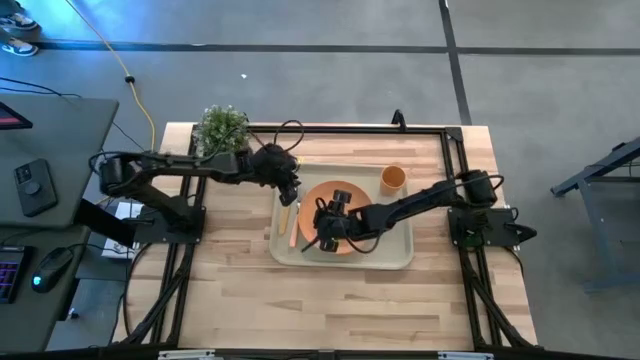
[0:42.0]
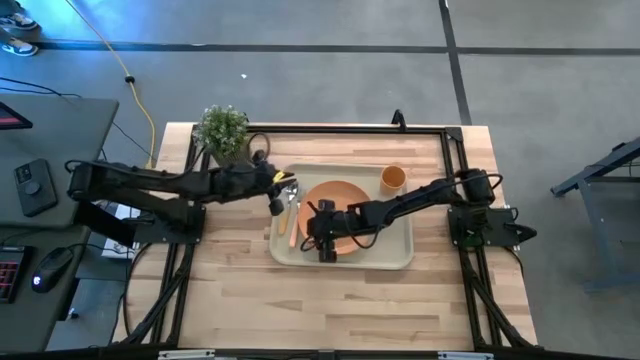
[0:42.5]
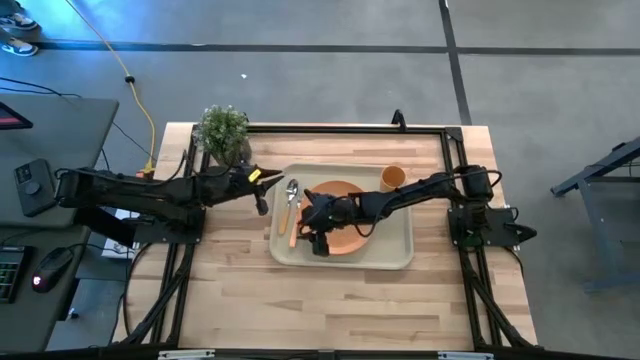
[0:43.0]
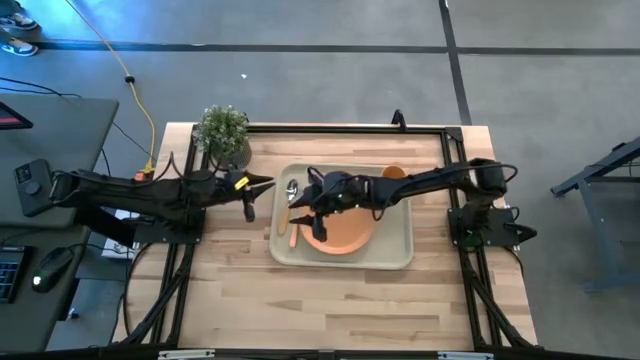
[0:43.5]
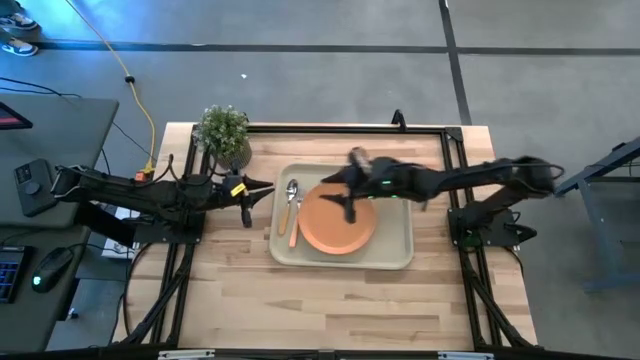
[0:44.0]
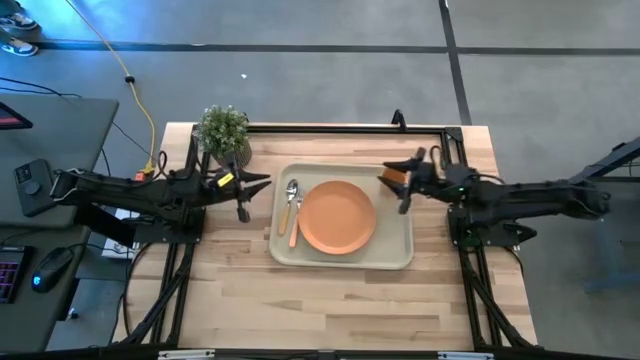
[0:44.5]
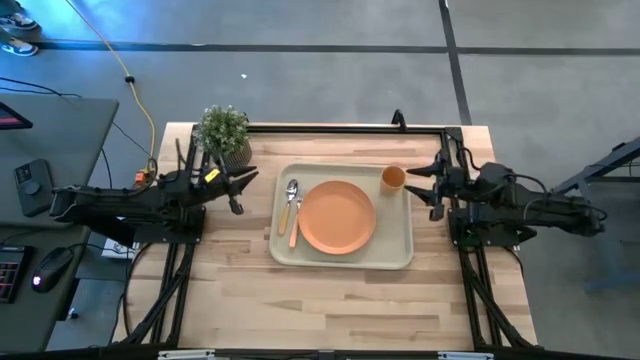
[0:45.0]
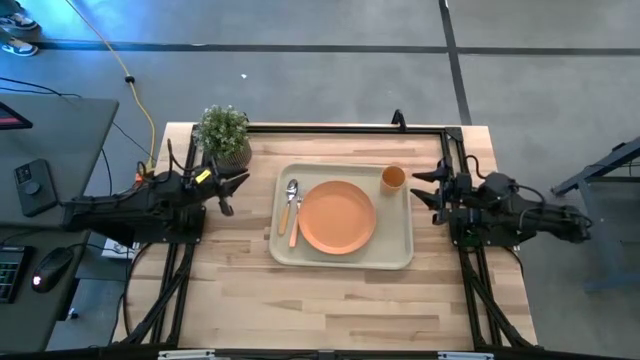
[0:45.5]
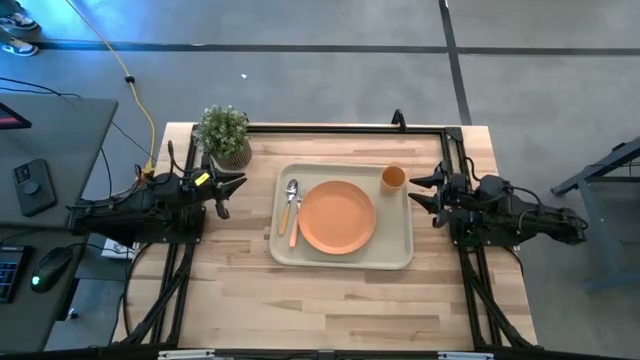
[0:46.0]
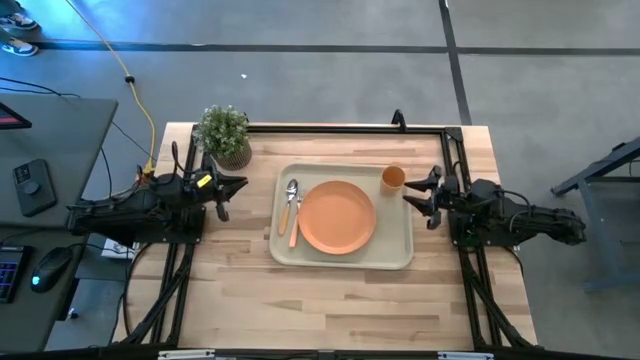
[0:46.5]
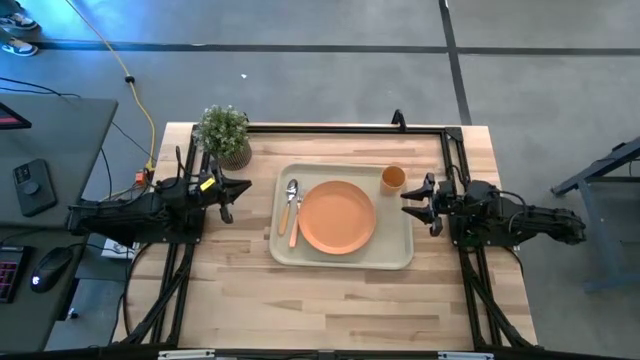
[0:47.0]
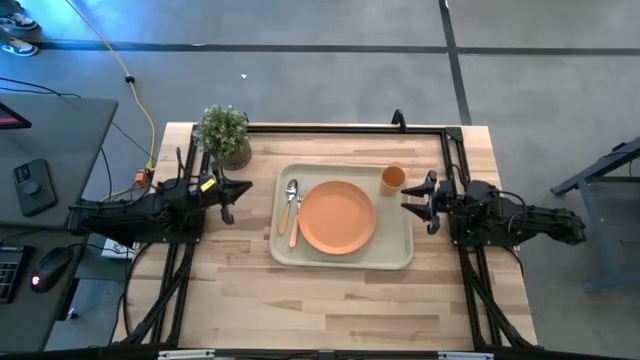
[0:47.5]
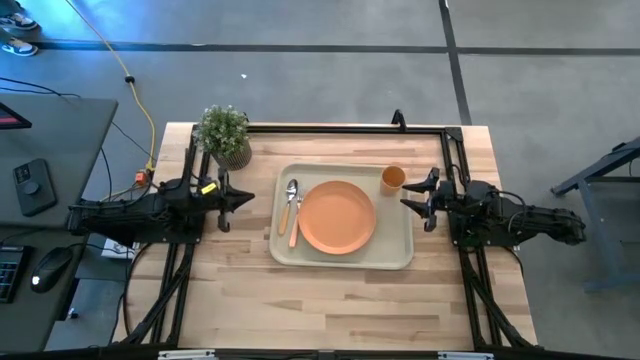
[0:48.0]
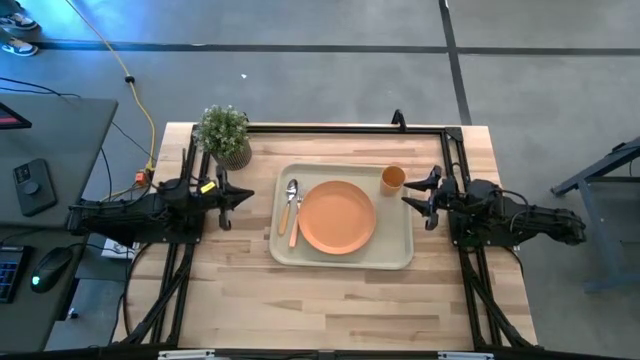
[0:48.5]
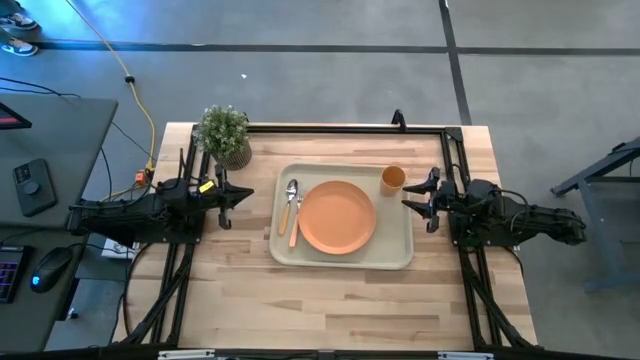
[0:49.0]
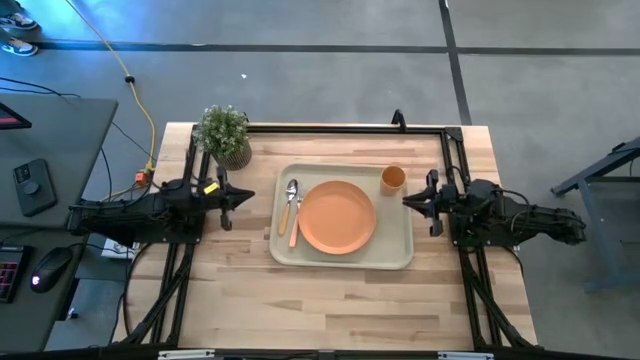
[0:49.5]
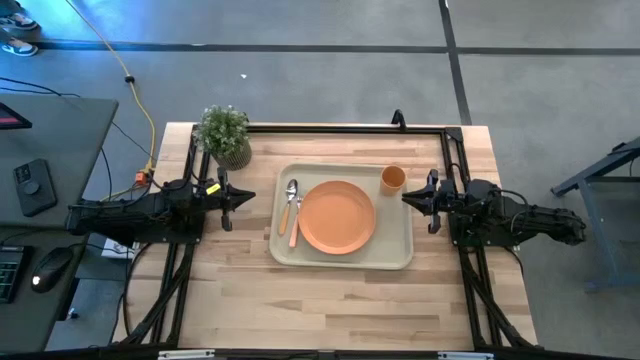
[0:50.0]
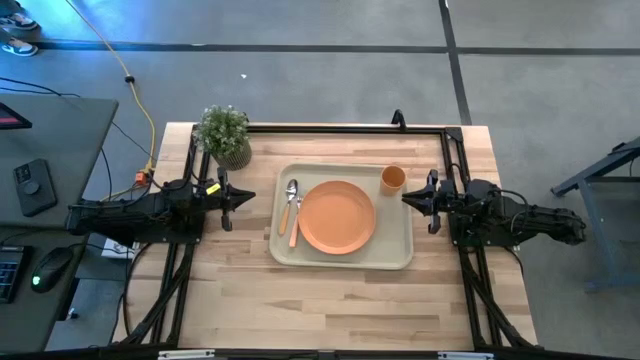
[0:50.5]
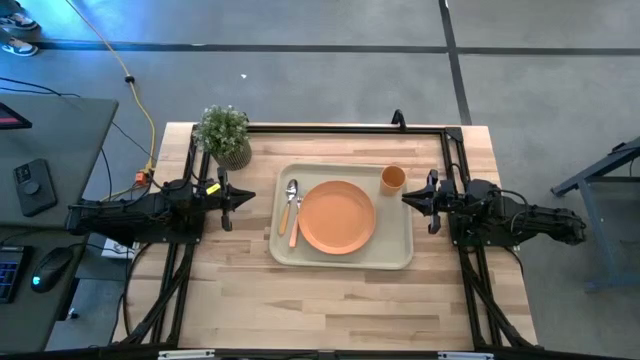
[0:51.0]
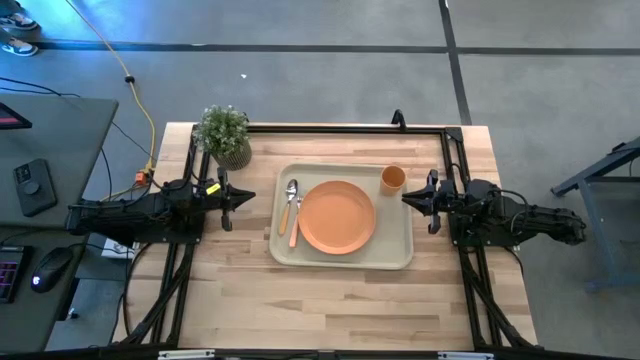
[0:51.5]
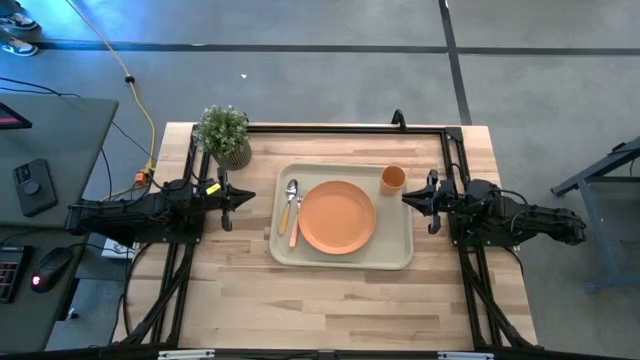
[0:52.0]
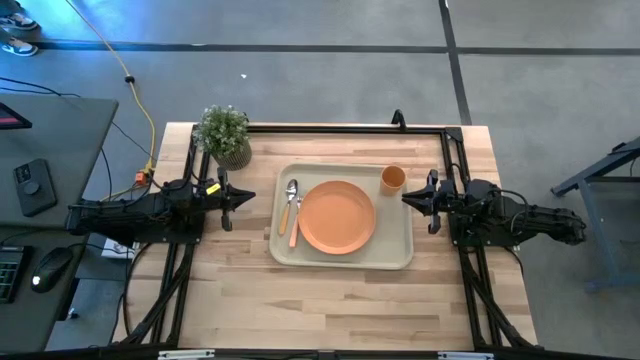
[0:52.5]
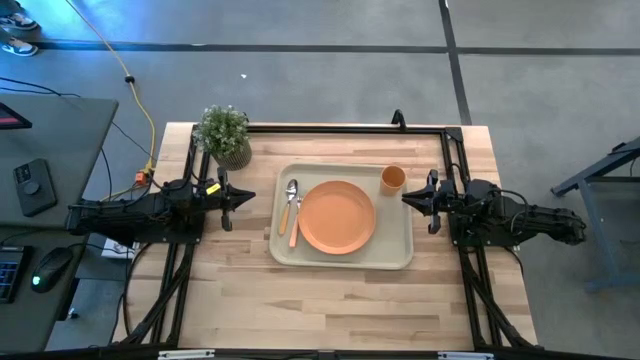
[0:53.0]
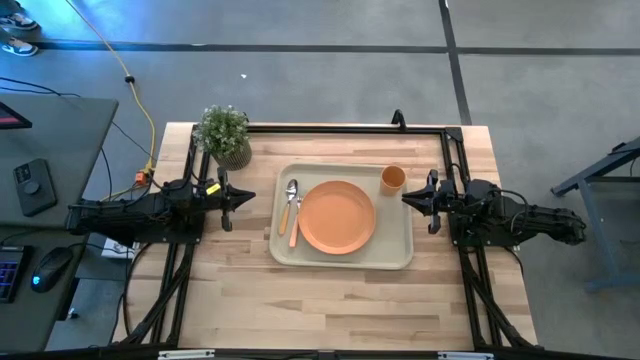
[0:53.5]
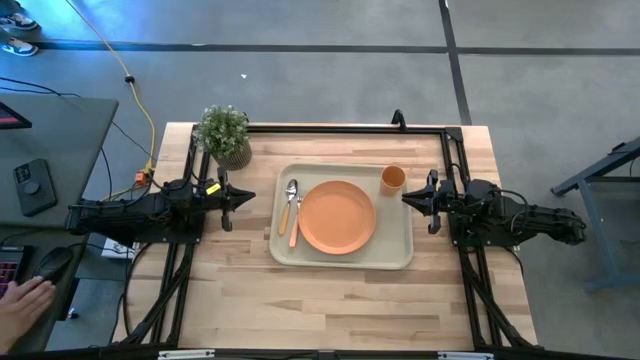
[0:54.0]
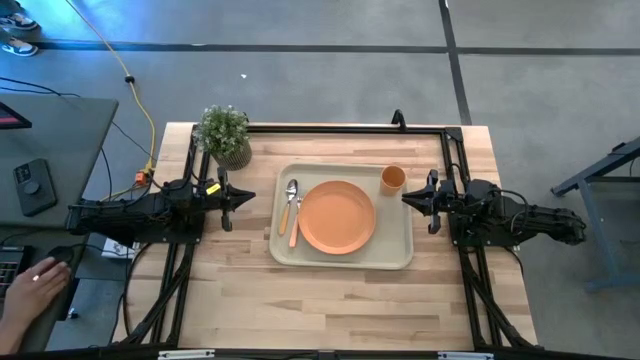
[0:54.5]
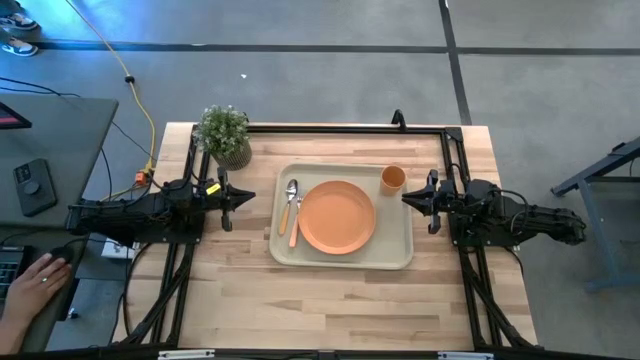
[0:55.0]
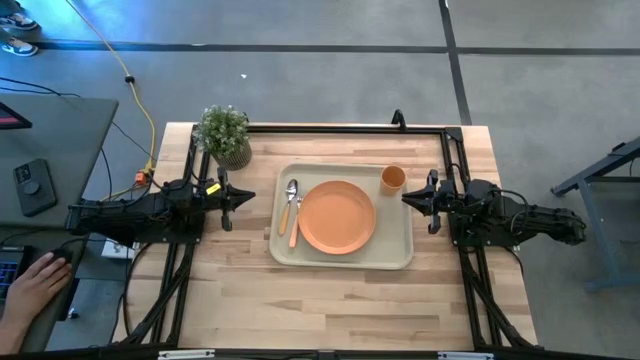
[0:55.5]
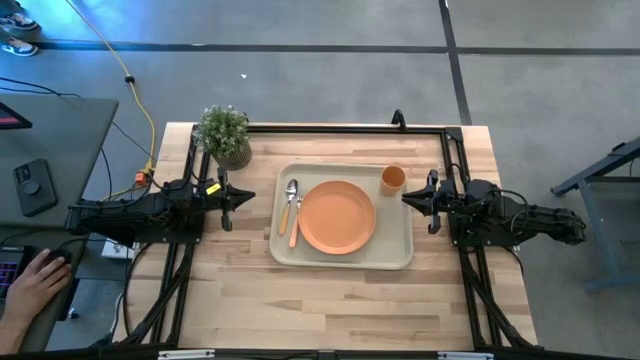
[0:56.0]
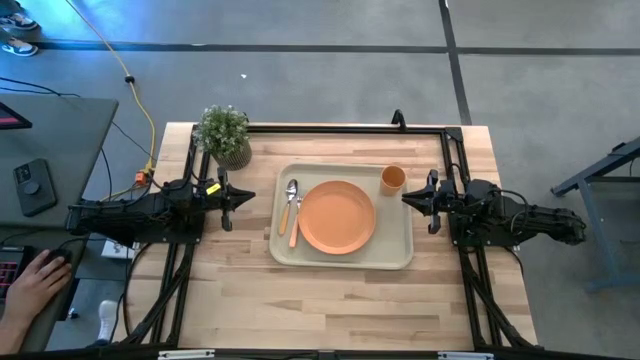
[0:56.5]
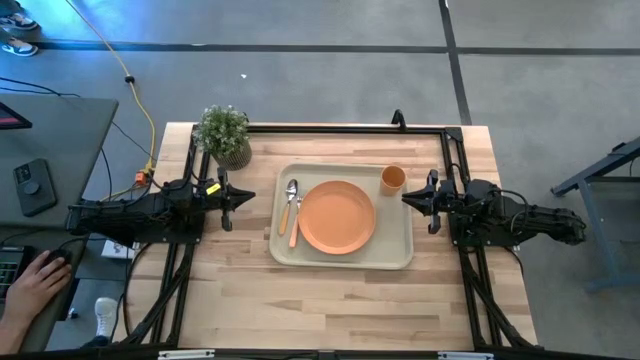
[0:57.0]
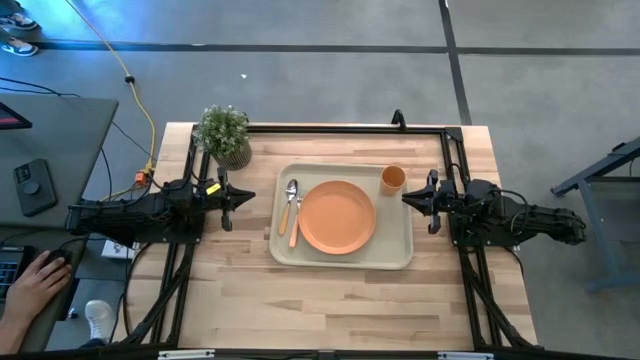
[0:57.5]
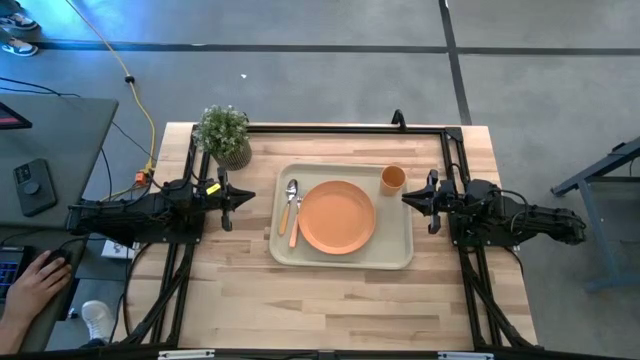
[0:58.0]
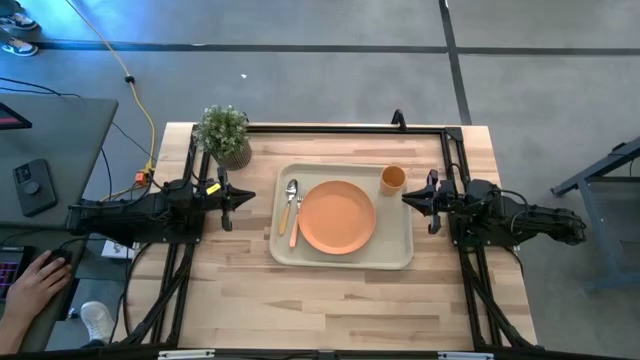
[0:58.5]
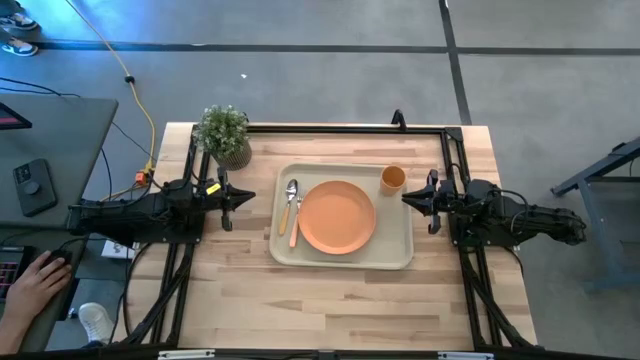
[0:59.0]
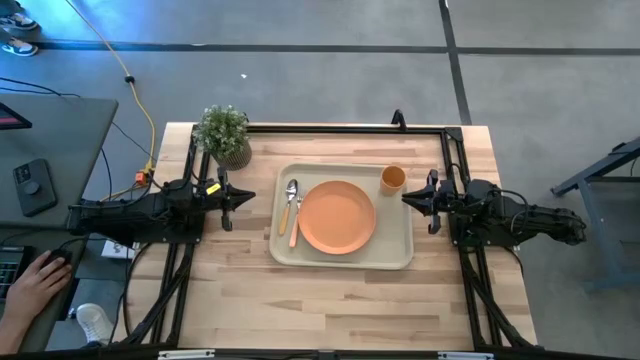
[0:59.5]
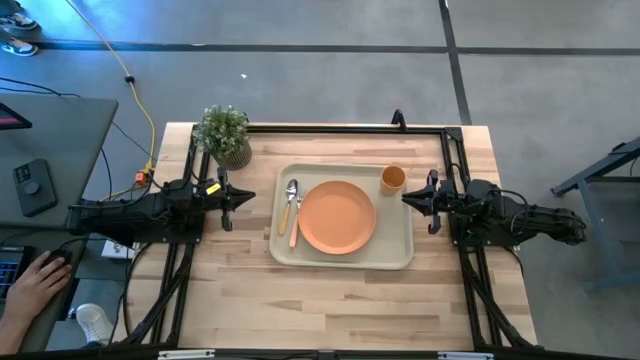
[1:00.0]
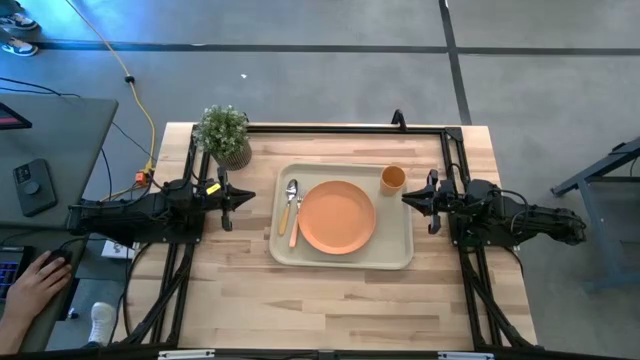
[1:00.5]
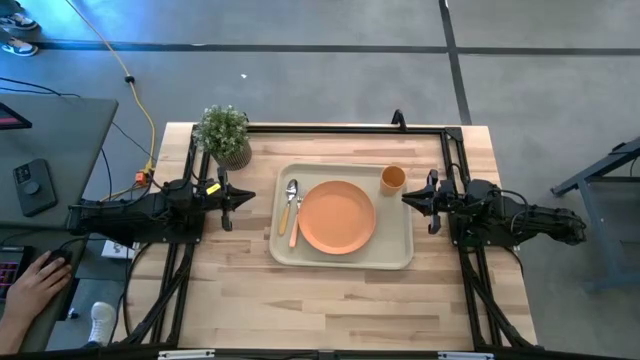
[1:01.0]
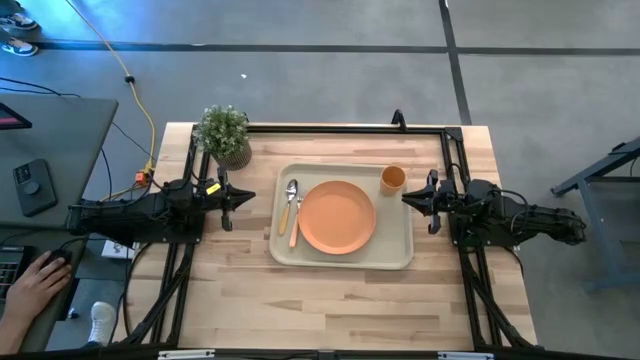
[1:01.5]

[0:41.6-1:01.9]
Task: Pick and place plate/cup/fork/spoon on tray
Return to Home Position

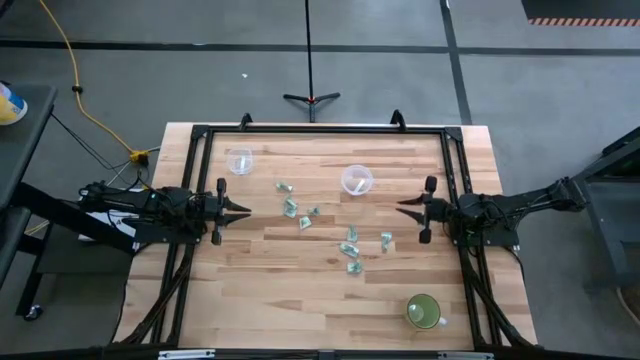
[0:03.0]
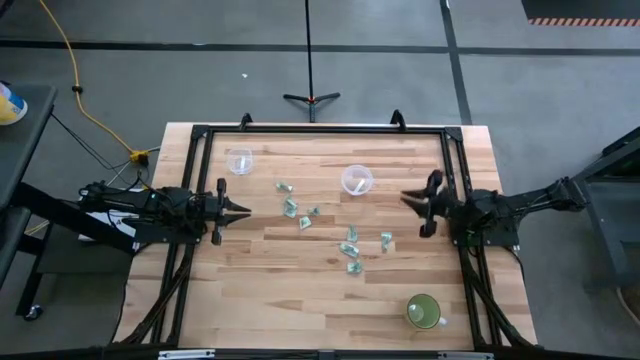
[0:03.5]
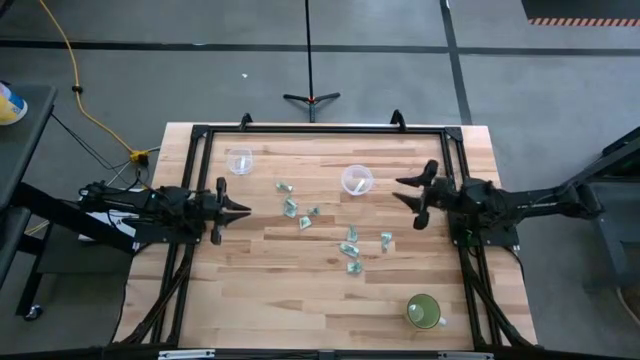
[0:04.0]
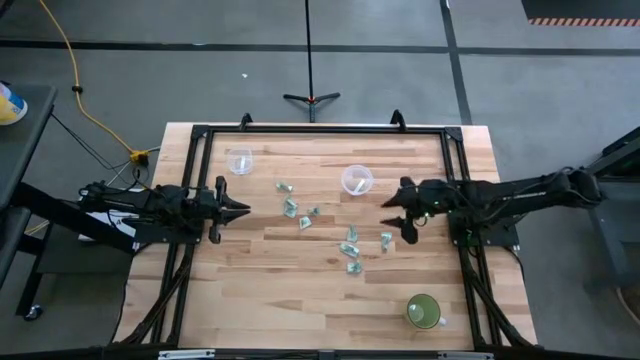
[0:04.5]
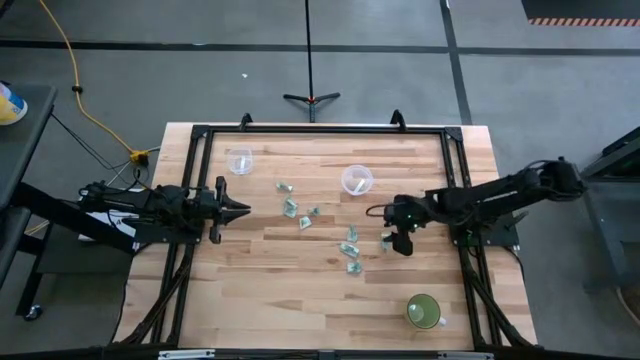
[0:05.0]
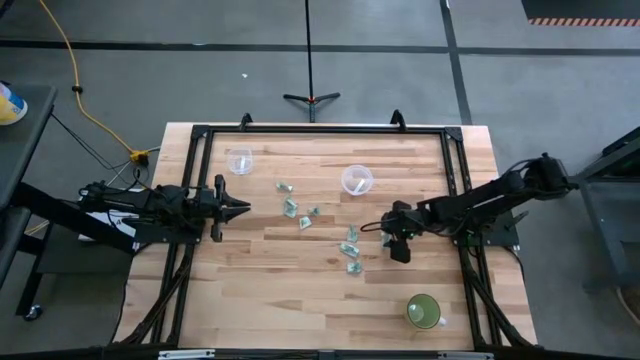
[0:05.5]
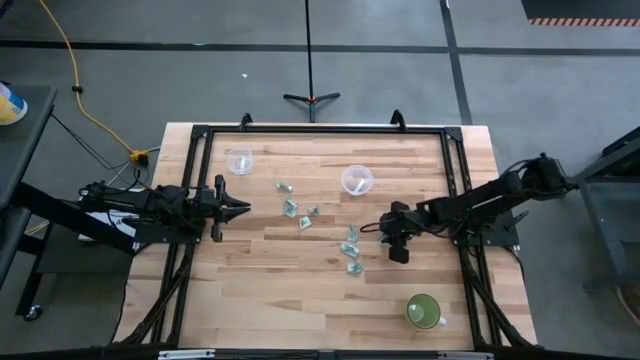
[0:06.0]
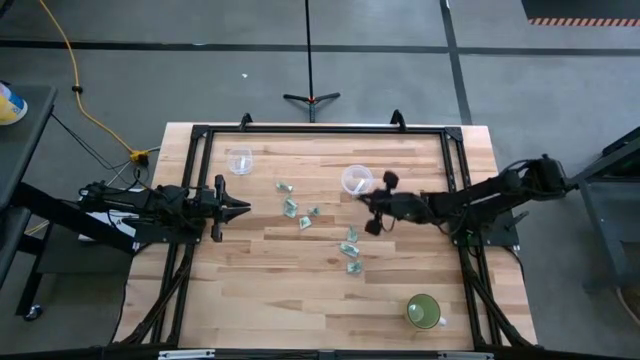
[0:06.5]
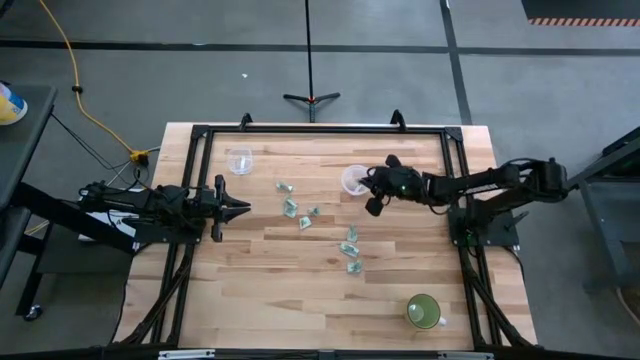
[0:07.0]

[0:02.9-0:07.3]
Task: Pick and place Stevia / Truvia into bins
Put the stevia packet into the bottom transparent container
